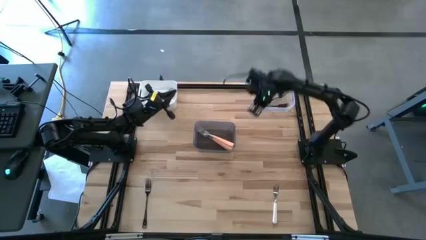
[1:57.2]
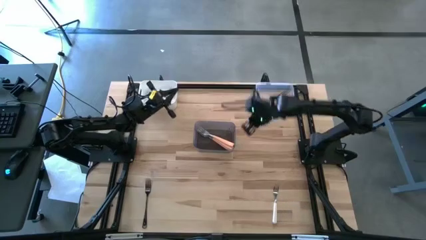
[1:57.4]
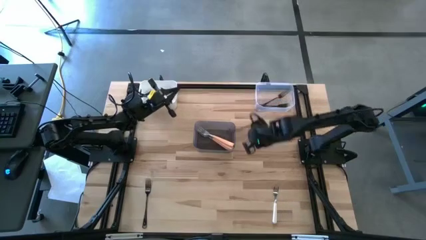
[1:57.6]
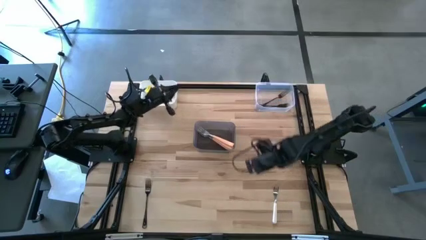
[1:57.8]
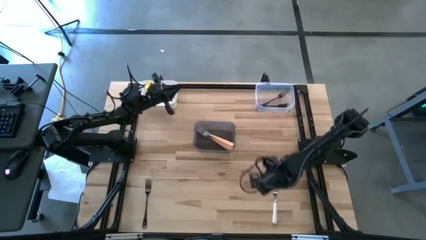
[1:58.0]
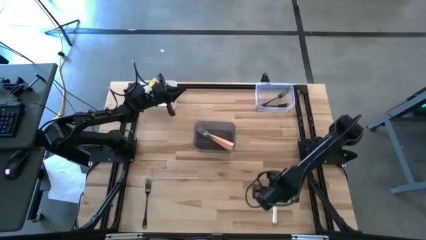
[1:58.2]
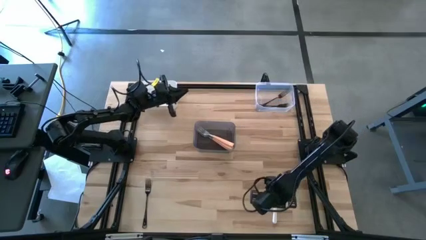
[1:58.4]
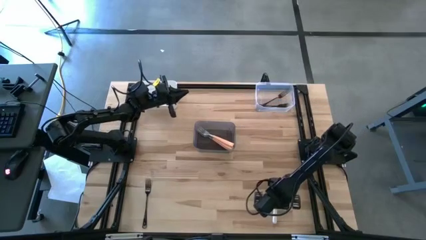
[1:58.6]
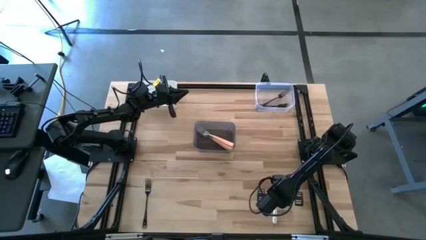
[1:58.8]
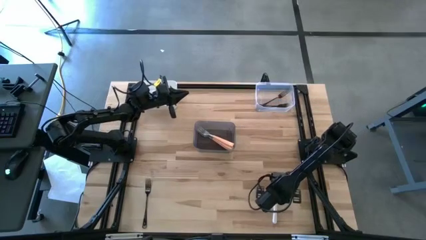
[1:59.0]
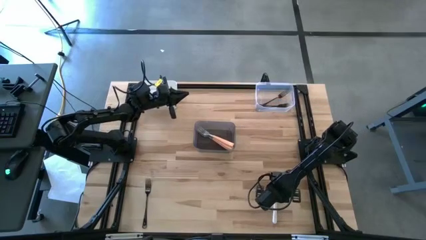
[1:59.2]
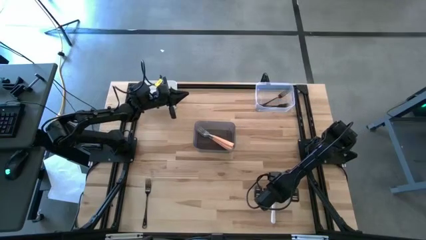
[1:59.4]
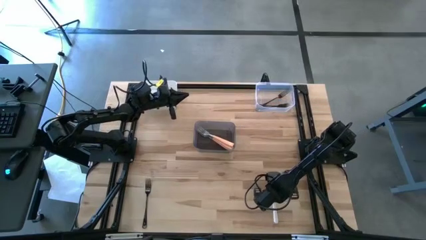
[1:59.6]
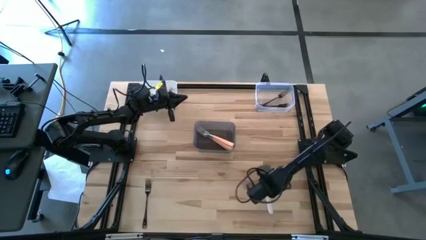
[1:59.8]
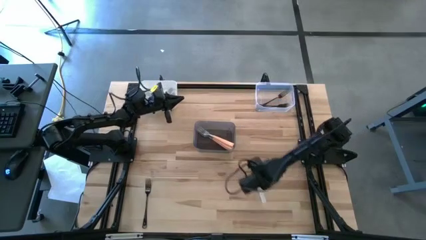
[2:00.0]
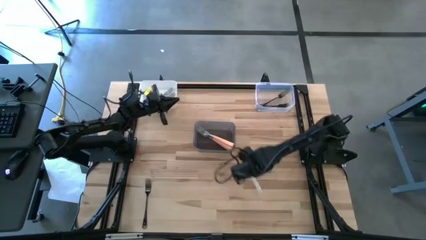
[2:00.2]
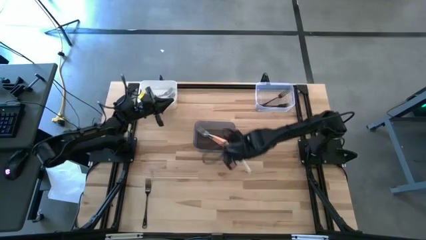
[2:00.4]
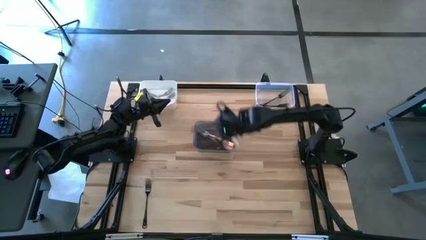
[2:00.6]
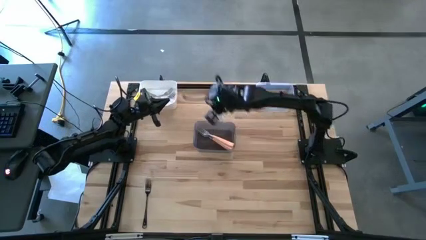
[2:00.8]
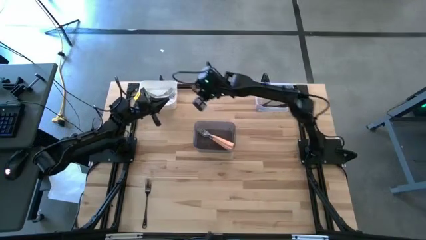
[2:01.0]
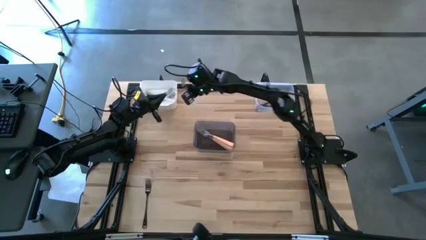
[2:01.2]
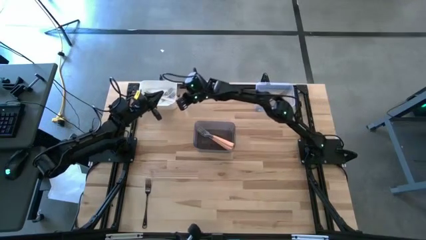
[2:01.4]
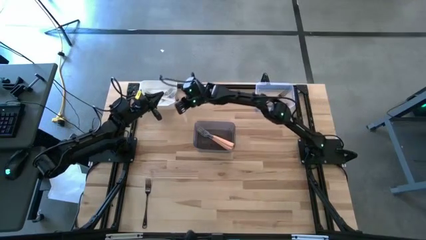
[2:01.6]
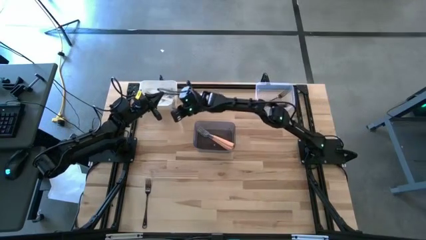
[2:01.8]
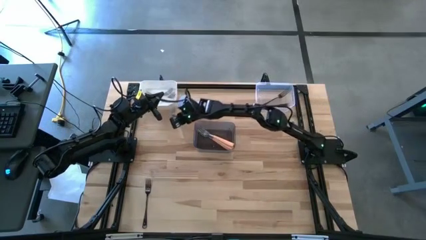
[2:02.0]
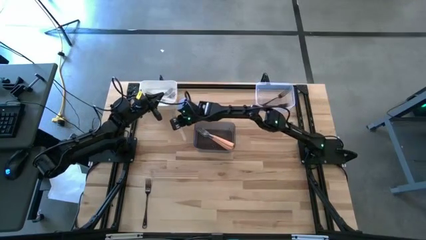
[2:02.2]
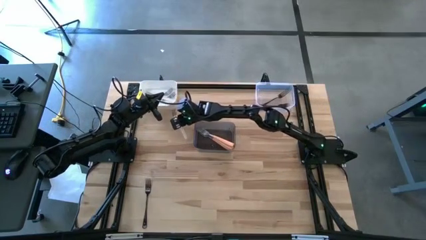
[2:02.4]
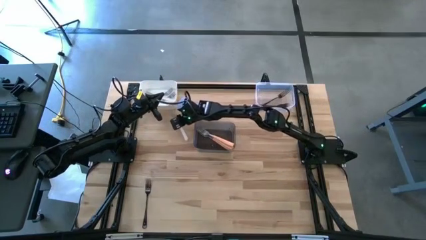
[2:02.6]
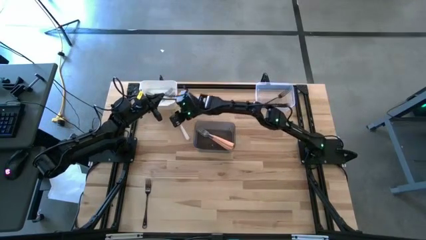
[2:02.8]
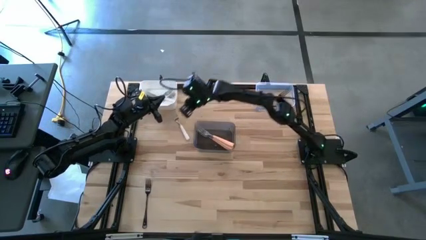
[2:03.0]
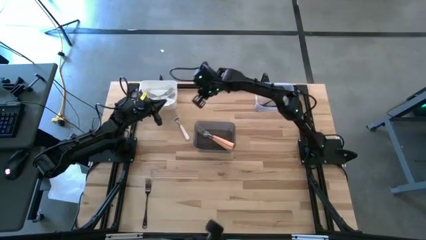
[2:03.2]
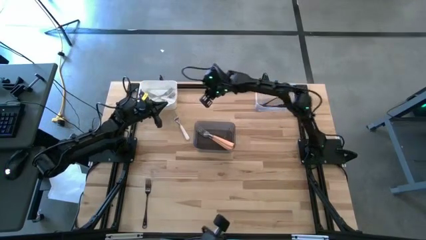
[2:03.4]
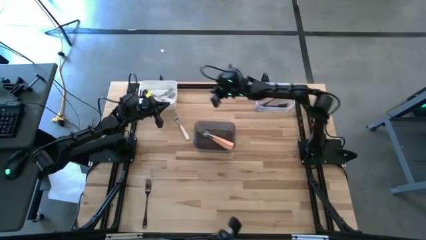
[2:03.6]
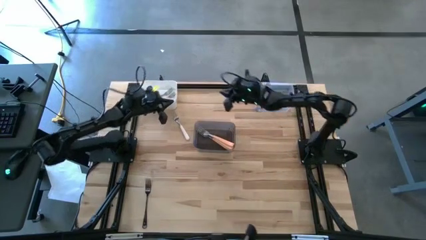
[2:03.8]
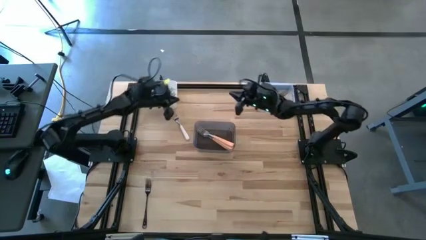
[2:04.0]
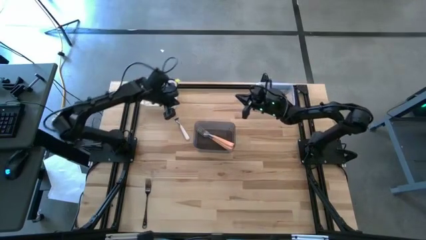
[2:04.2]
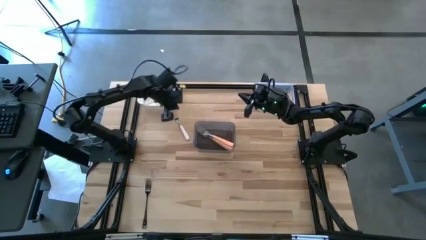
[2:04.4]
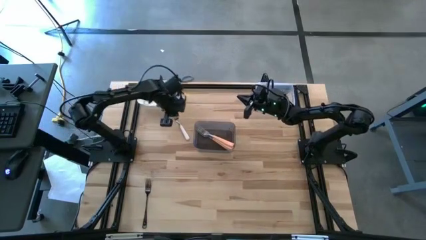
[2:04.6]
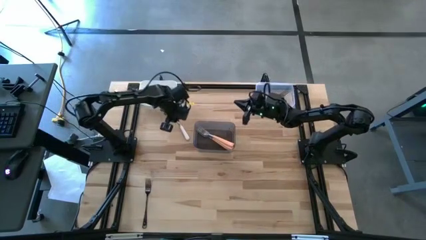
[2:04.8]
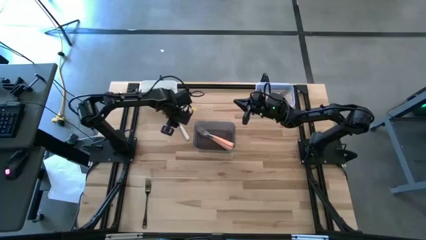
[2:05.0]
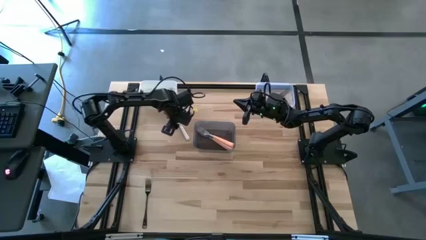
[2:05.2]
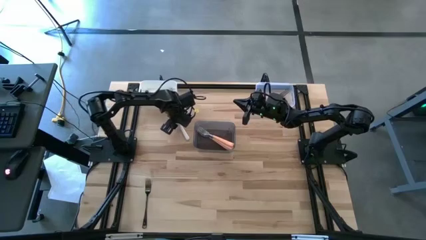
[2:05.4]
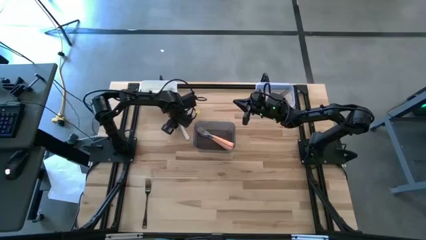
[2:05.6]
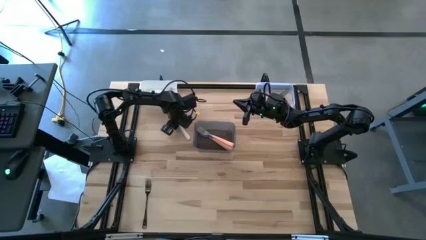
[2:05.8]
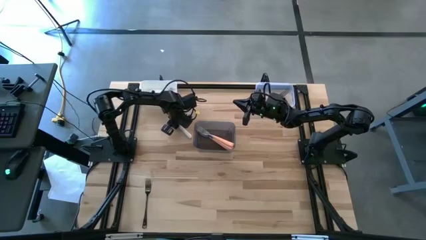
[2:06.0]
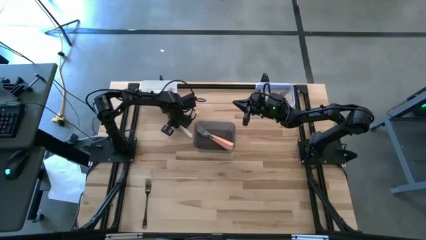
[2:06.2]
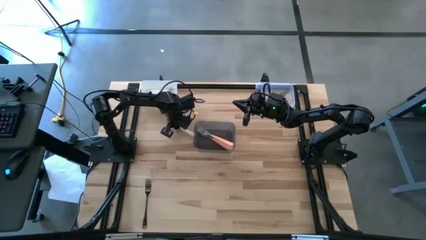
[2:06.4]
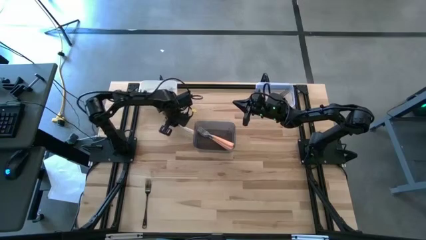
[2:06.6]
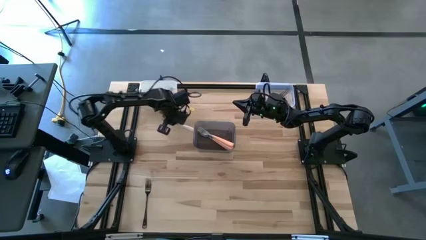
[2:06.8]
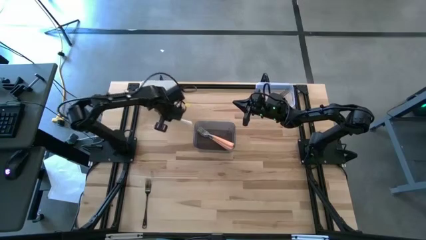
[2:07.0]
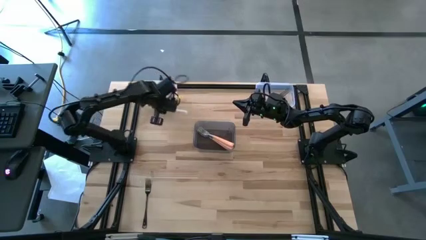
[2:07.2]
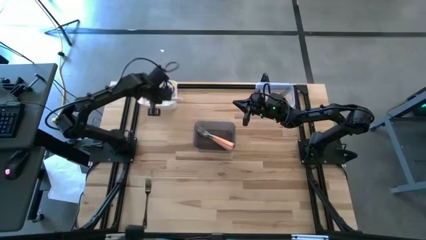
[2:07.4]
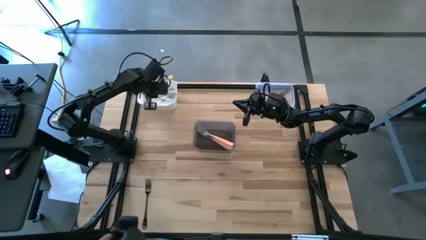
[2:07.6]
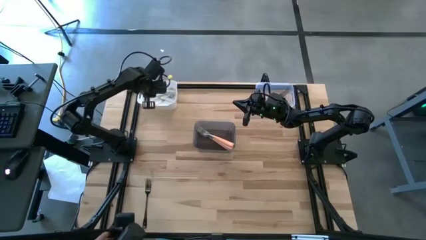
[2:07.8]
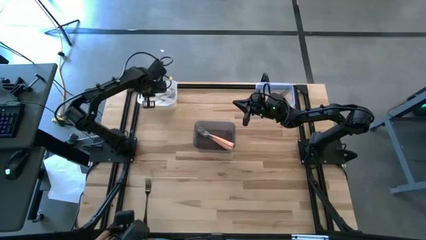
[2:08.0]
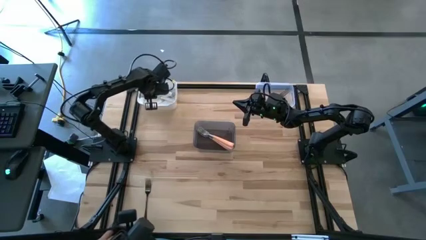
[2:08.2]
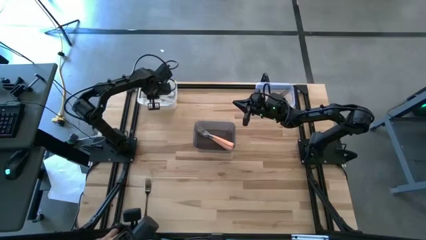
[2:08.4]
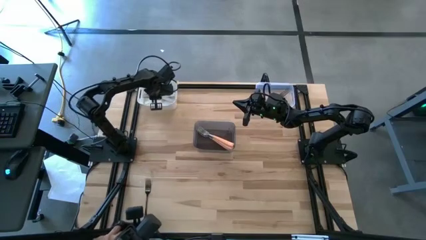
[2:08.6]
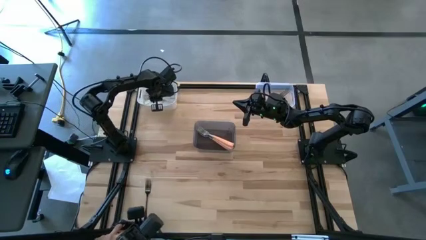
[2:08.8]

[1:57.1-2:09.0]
Task: Sort silverware by color (type)
Put the white fork into the white bin
